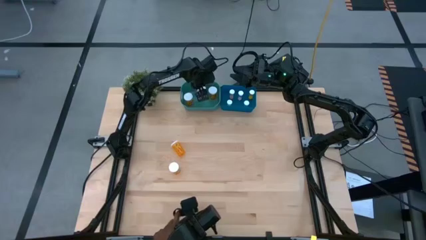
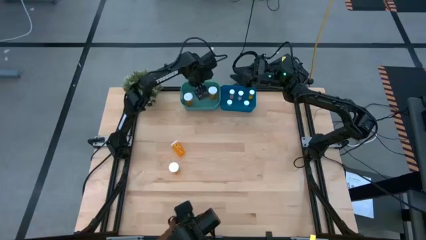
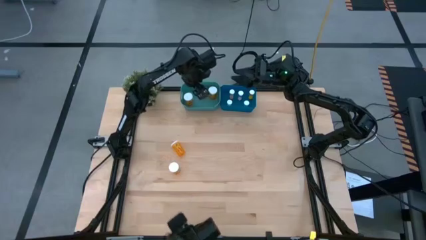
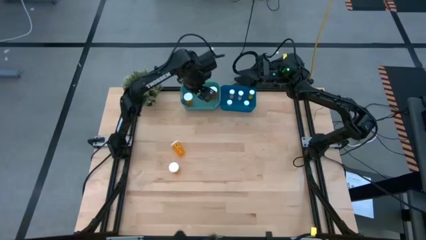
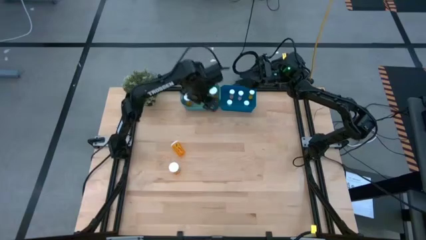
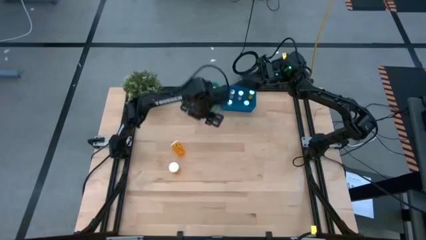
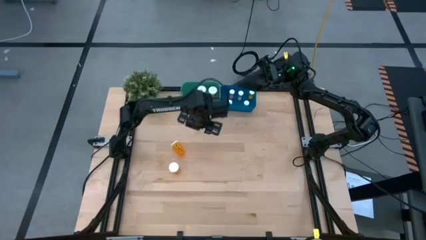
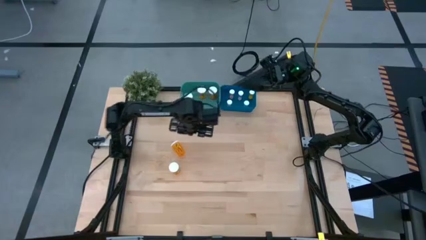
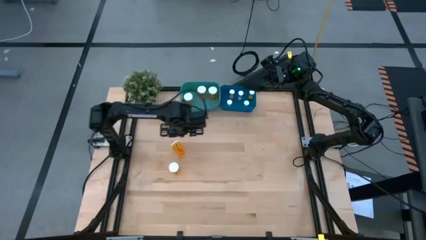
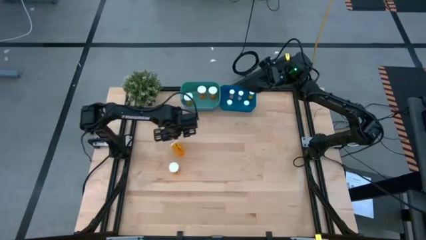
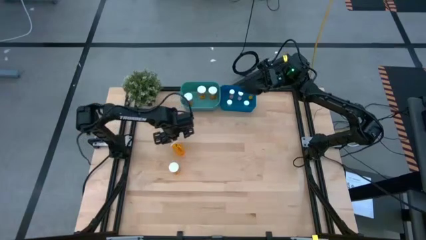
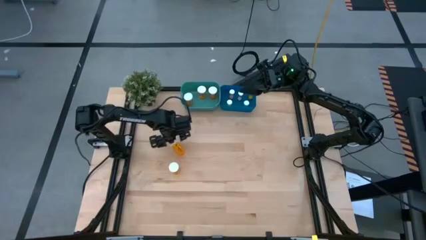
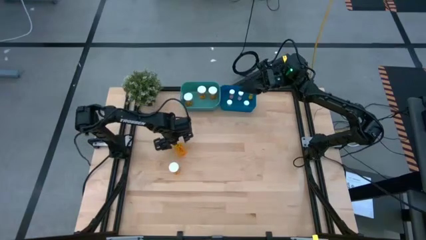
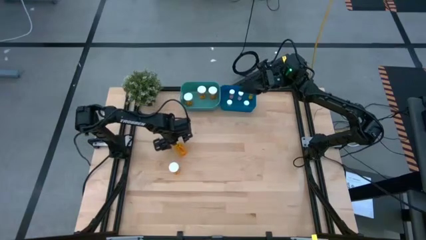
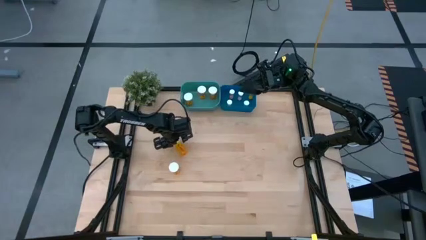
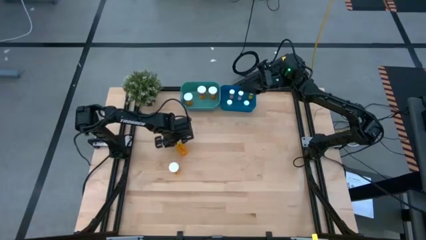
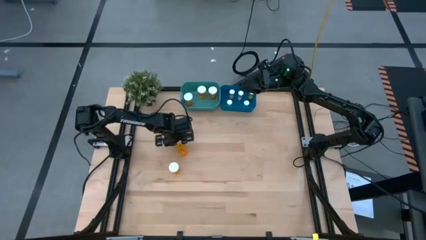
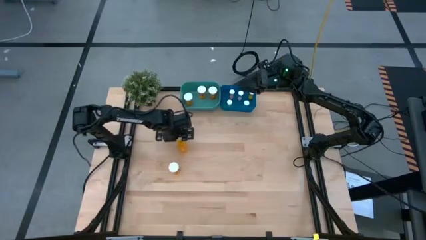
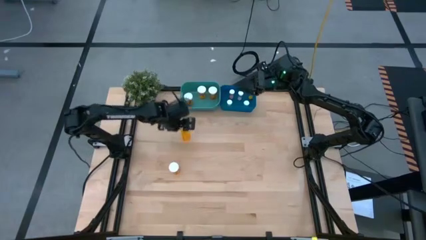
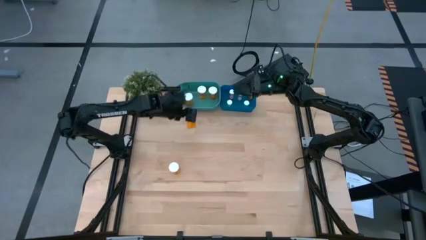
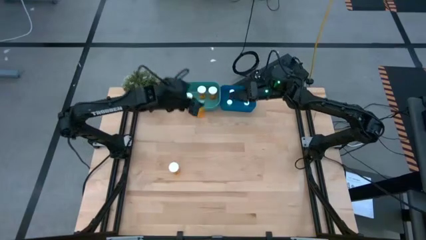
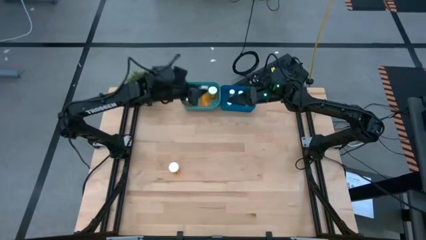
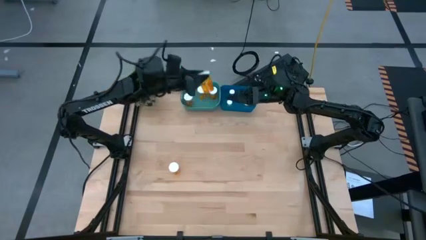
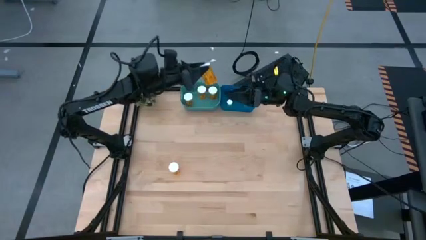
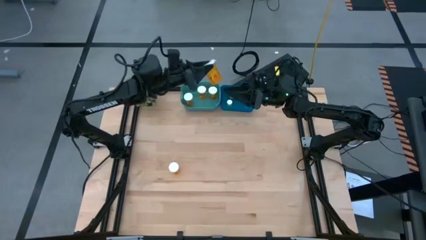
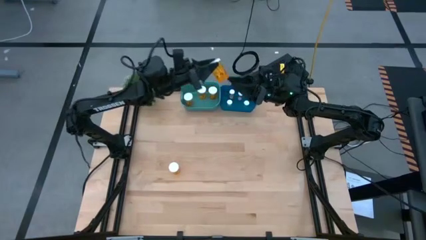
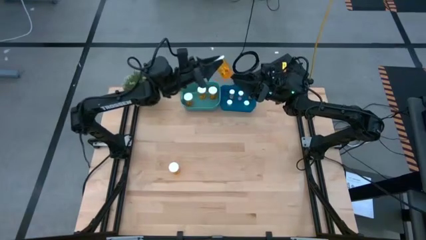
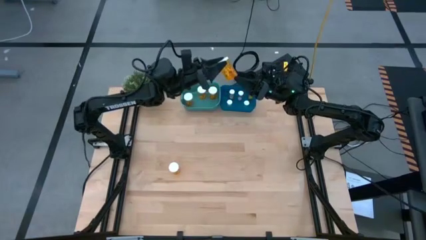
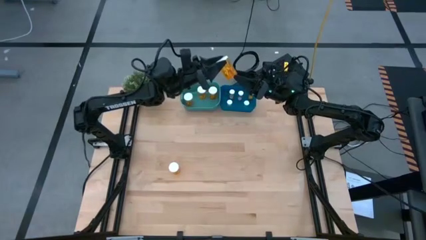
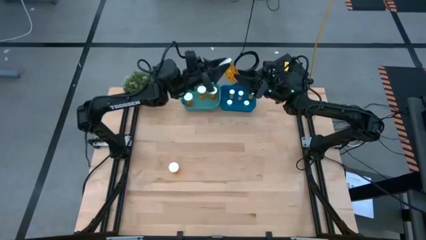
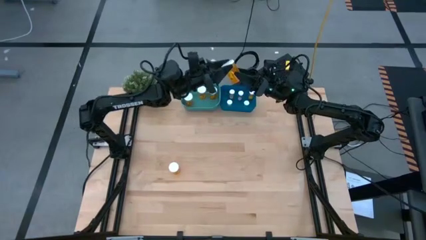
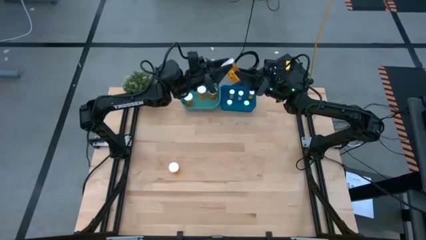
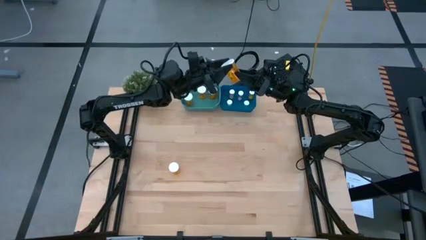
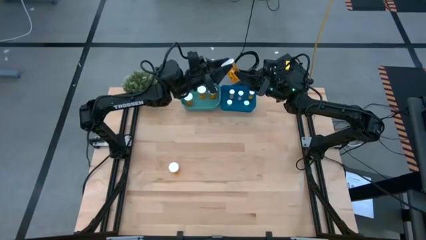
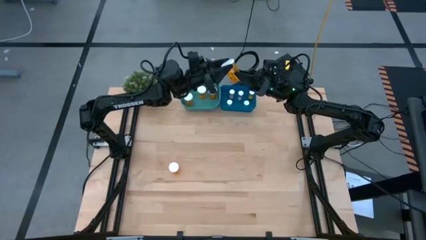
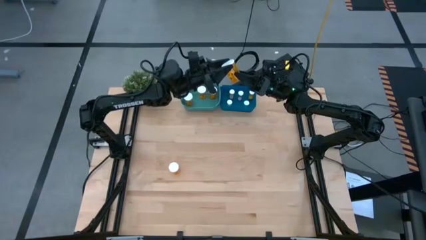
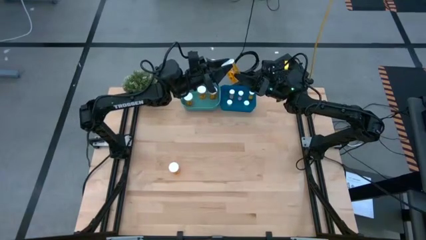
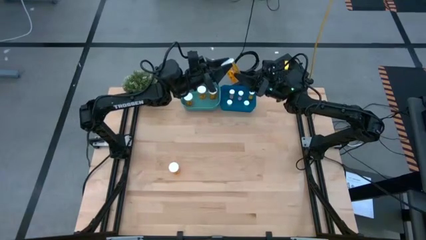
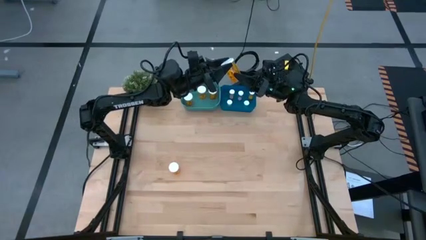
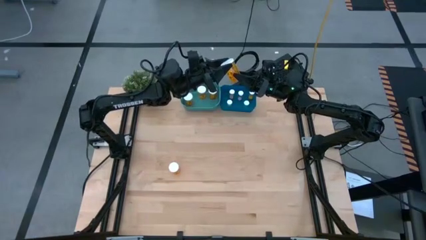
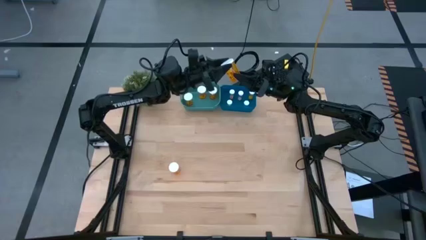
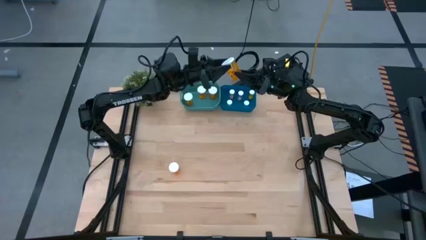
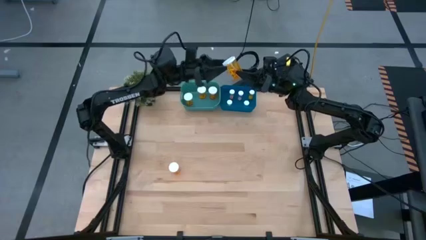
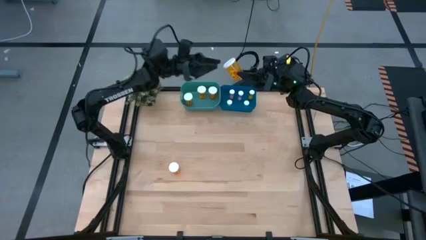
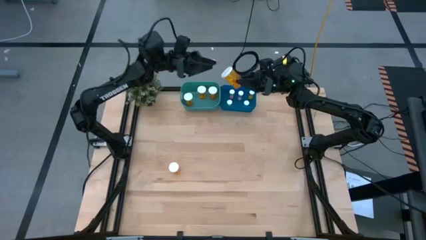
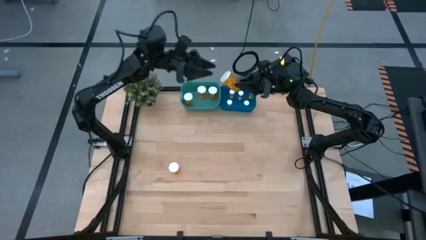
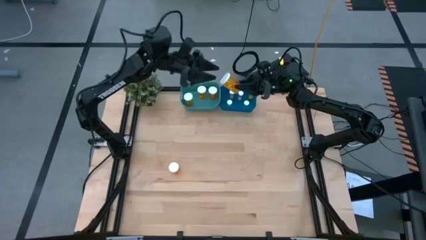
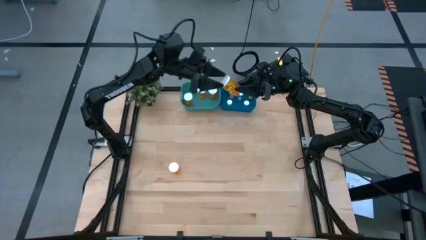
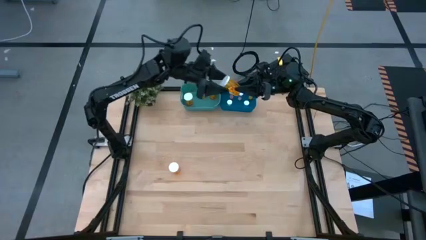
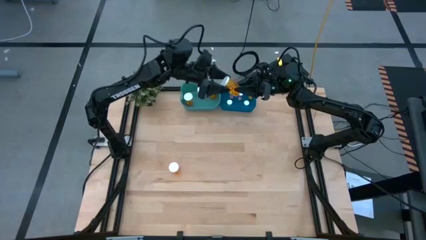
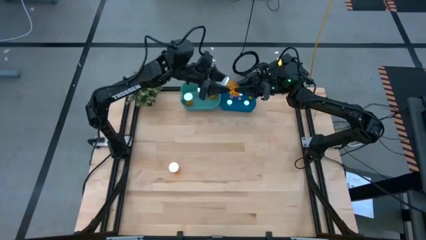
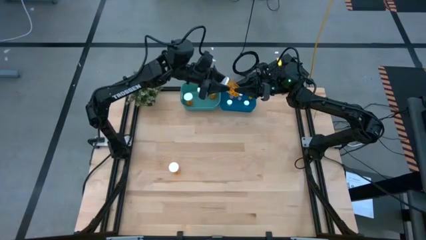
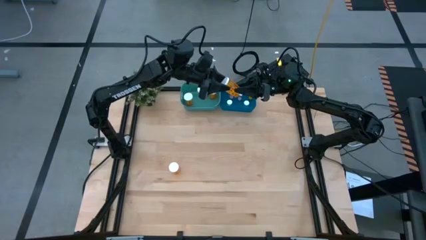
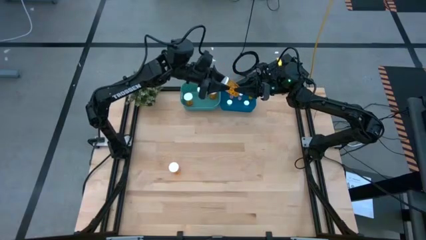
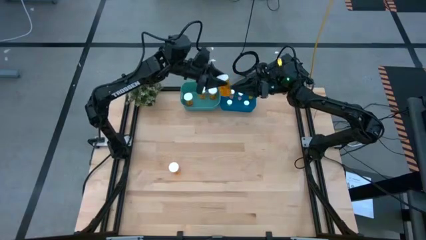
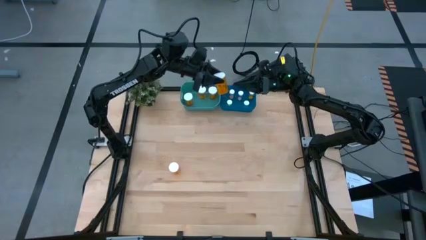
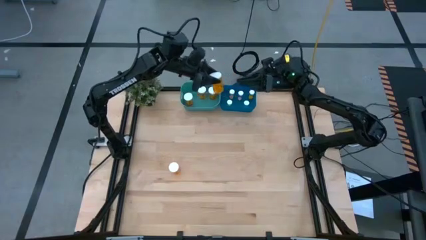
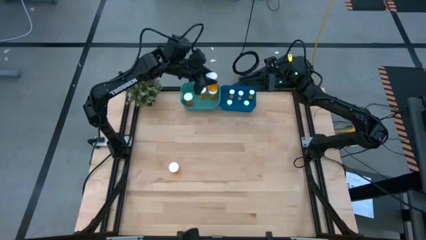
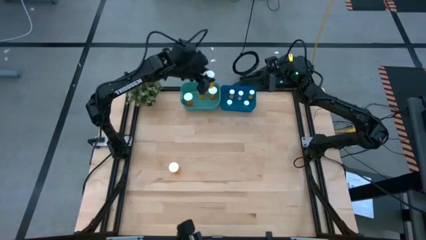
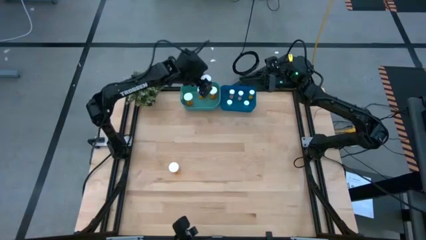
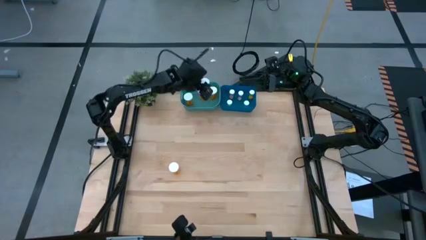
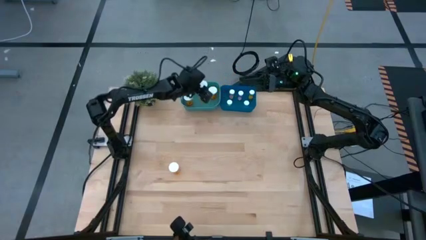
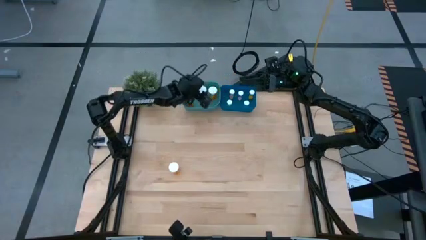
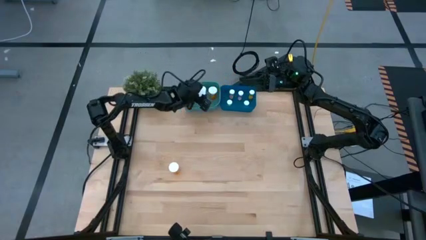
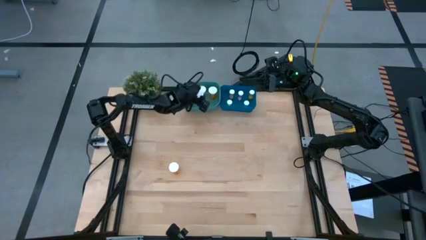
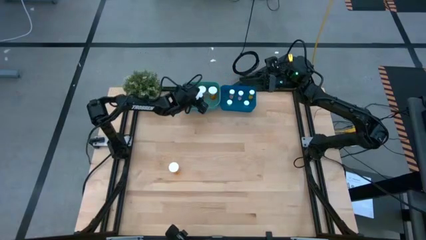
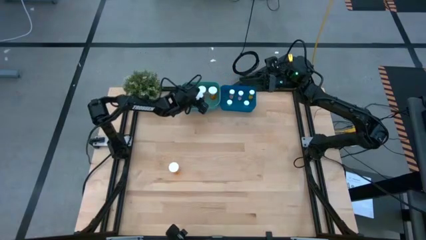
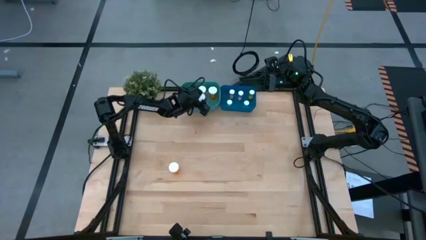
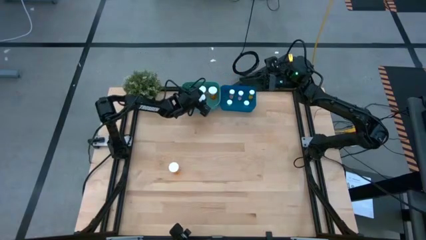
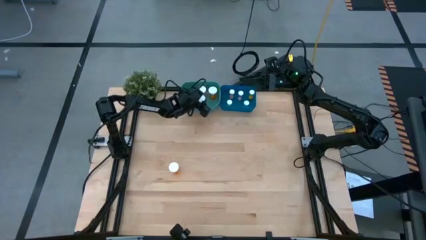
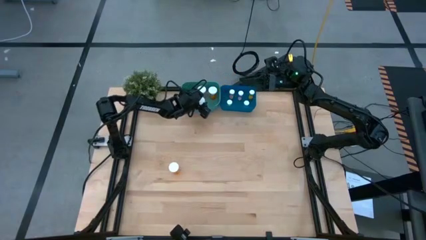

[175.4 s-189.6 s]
Task: Pick and place medicine bottles into bin by pill shape (circle, oval)
Put the large orange capsule bottle into the green bin
